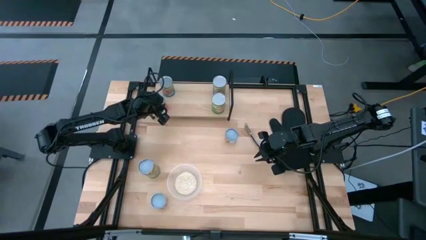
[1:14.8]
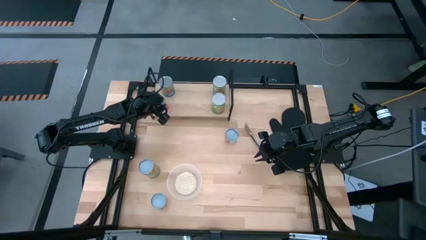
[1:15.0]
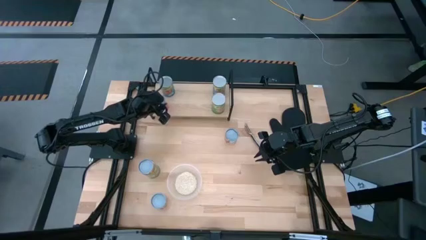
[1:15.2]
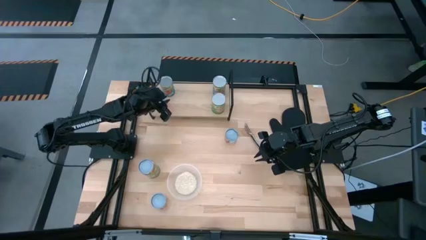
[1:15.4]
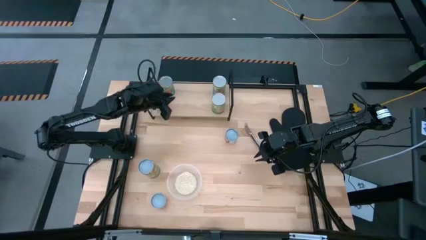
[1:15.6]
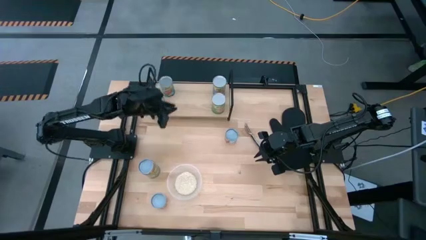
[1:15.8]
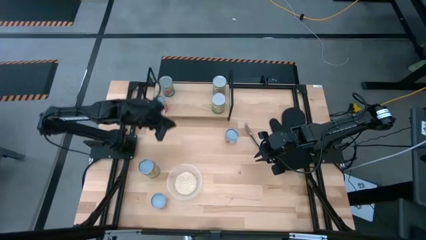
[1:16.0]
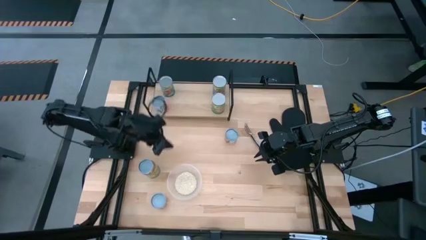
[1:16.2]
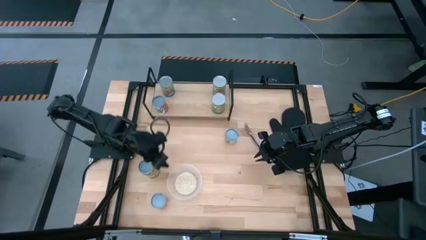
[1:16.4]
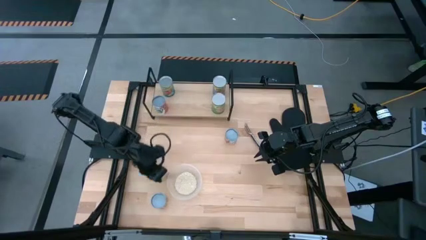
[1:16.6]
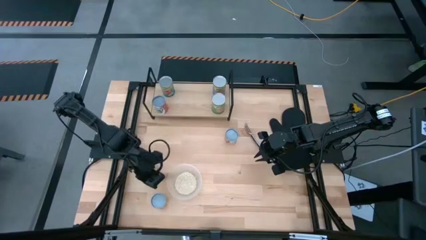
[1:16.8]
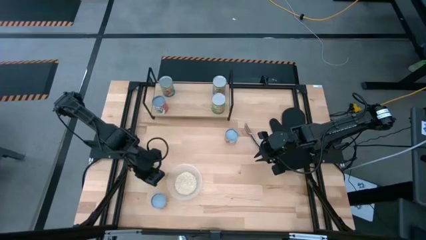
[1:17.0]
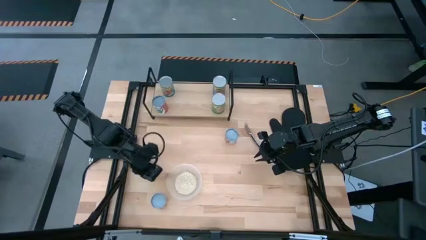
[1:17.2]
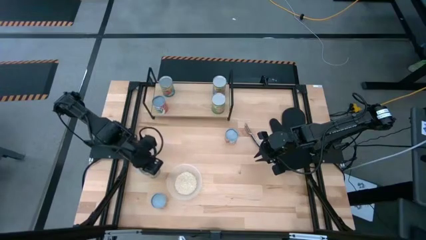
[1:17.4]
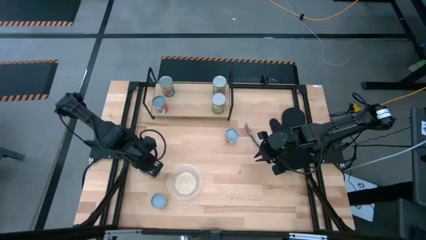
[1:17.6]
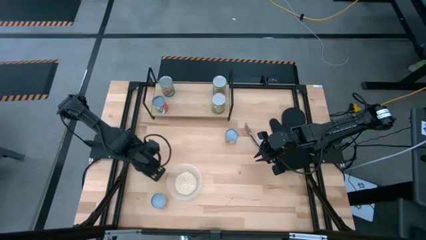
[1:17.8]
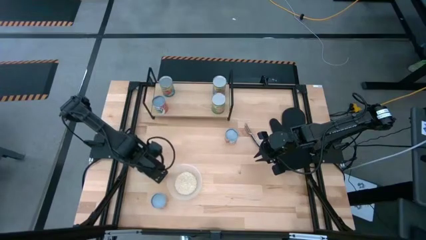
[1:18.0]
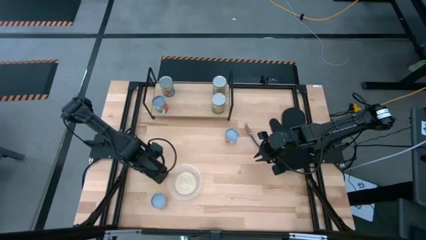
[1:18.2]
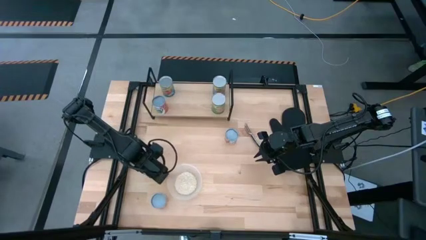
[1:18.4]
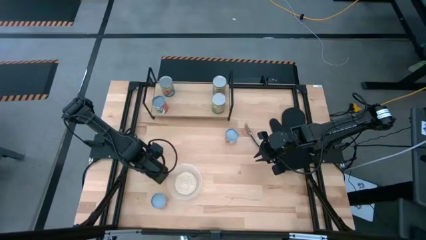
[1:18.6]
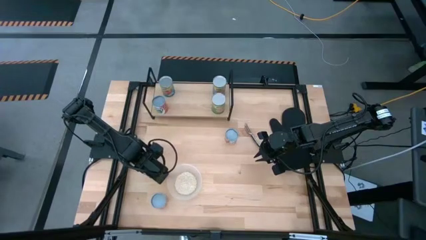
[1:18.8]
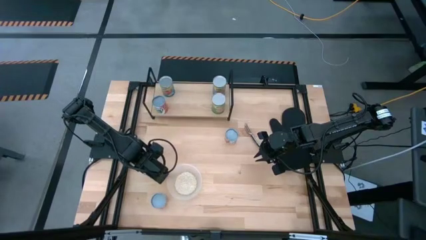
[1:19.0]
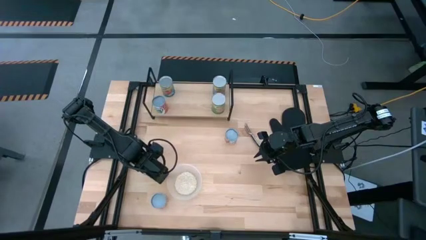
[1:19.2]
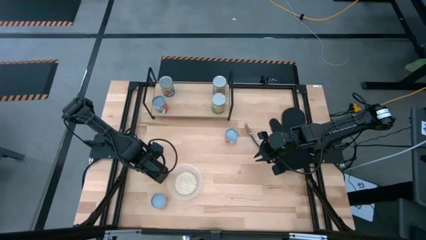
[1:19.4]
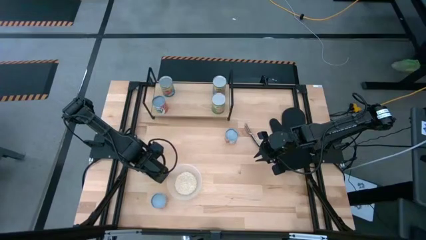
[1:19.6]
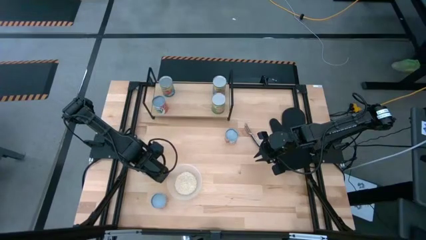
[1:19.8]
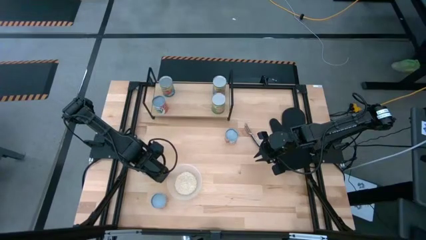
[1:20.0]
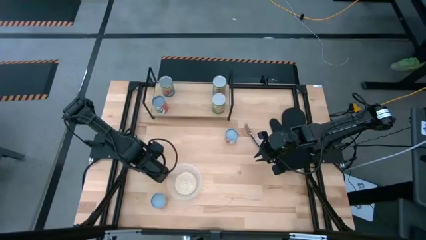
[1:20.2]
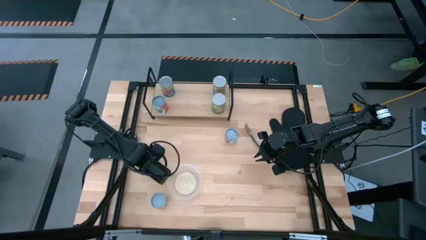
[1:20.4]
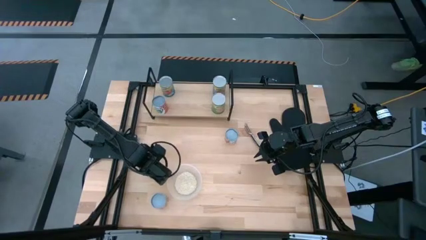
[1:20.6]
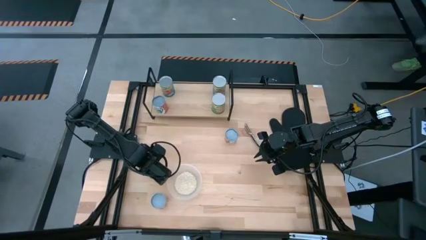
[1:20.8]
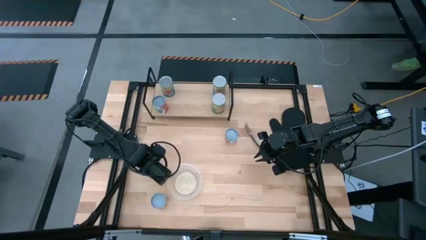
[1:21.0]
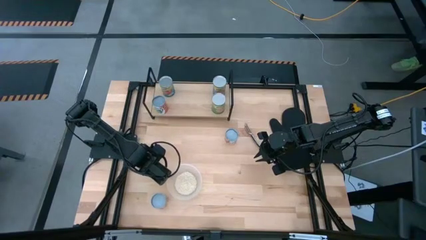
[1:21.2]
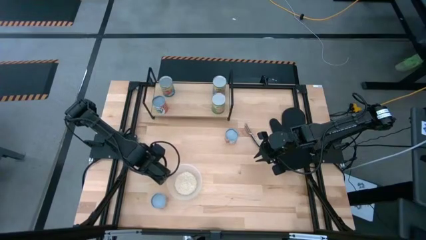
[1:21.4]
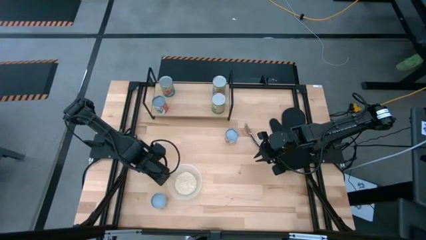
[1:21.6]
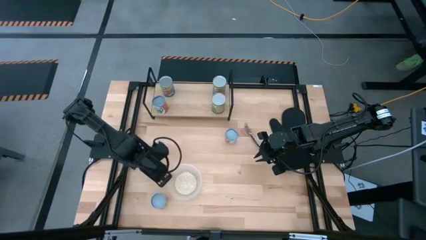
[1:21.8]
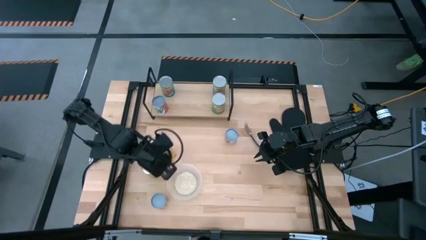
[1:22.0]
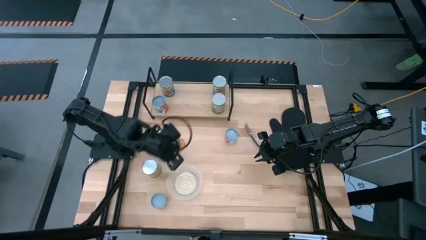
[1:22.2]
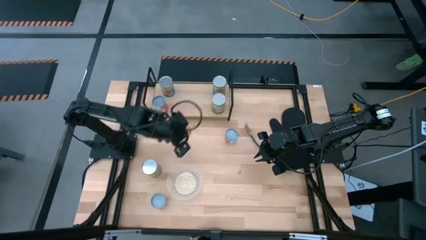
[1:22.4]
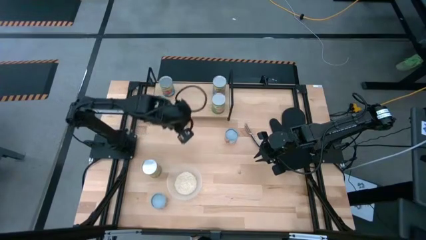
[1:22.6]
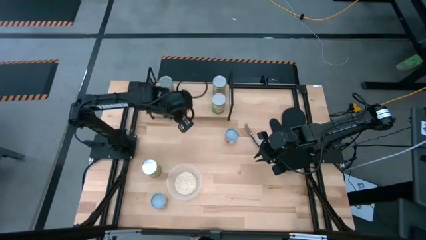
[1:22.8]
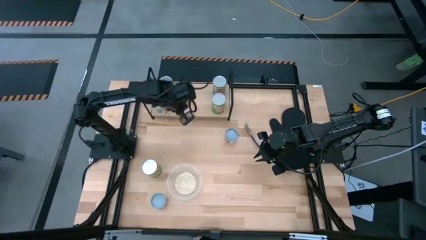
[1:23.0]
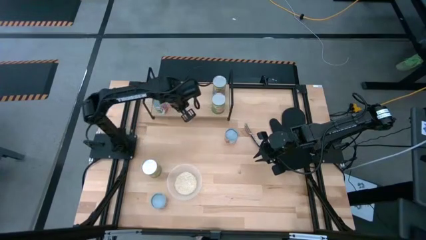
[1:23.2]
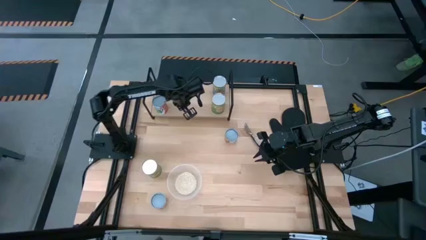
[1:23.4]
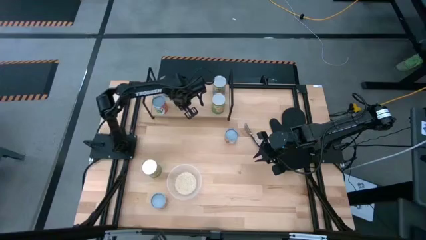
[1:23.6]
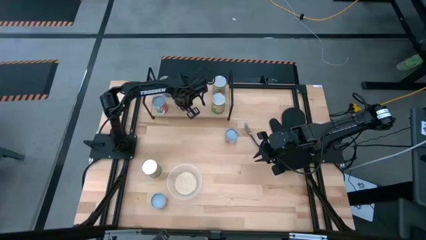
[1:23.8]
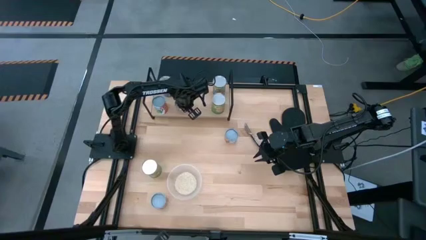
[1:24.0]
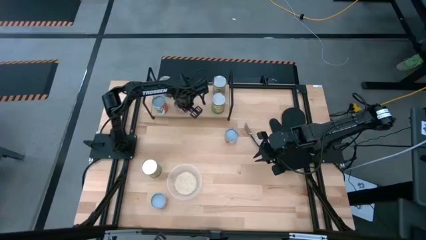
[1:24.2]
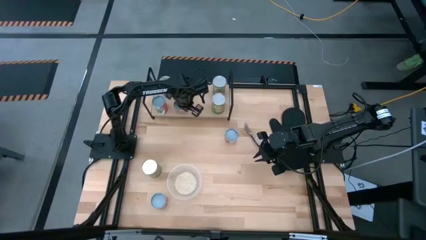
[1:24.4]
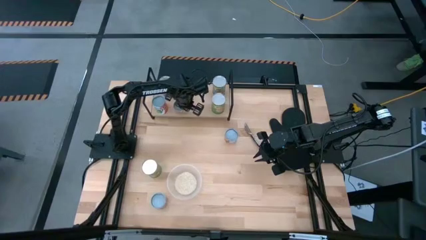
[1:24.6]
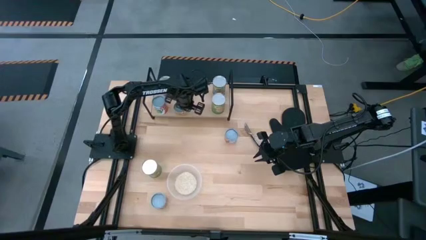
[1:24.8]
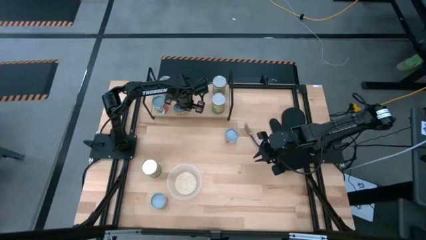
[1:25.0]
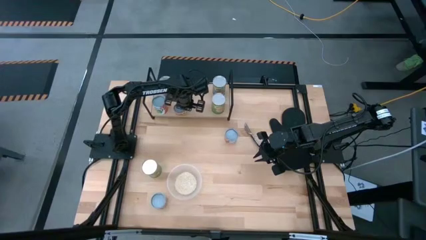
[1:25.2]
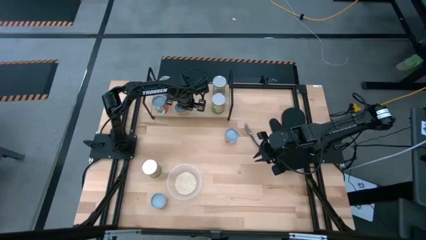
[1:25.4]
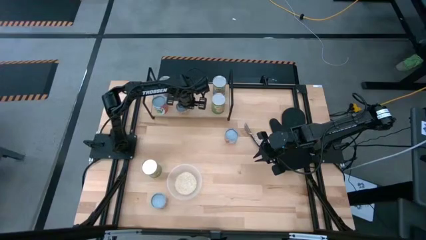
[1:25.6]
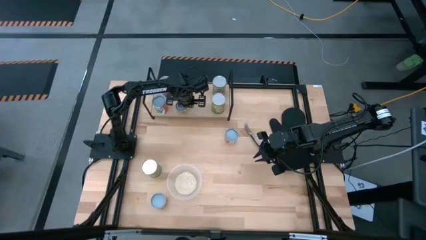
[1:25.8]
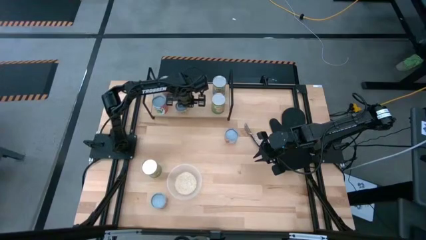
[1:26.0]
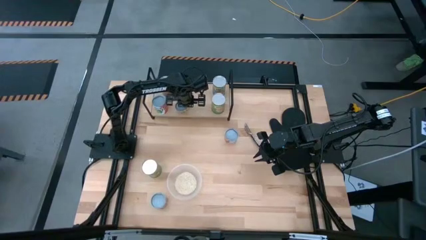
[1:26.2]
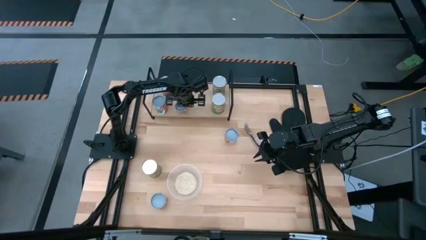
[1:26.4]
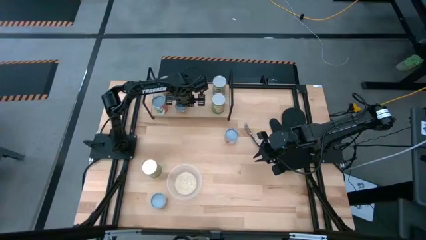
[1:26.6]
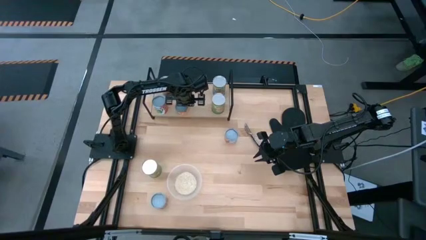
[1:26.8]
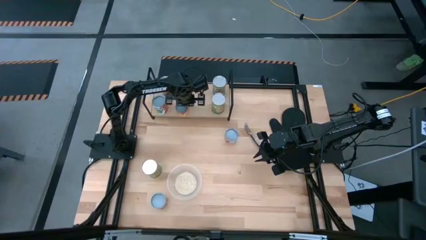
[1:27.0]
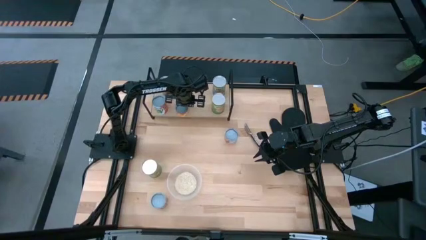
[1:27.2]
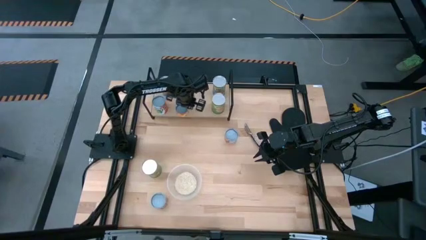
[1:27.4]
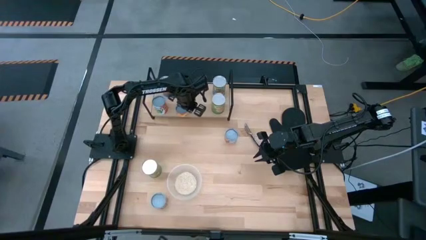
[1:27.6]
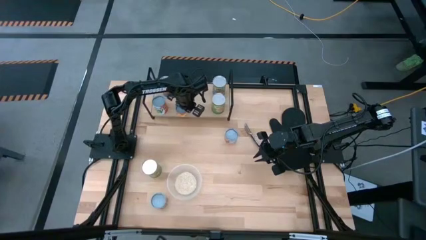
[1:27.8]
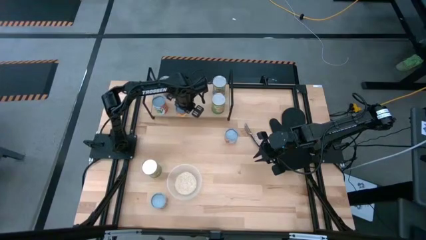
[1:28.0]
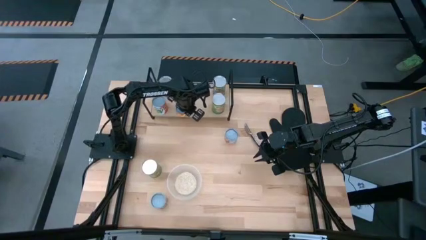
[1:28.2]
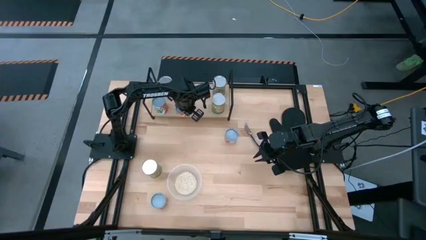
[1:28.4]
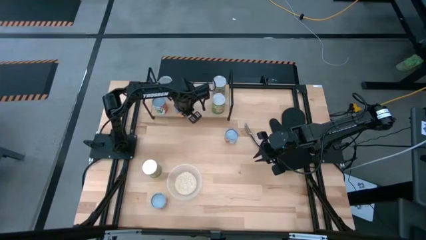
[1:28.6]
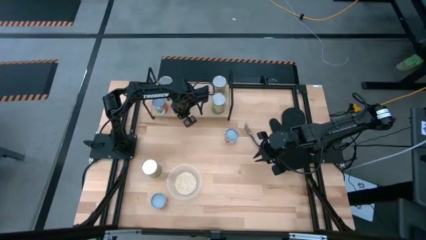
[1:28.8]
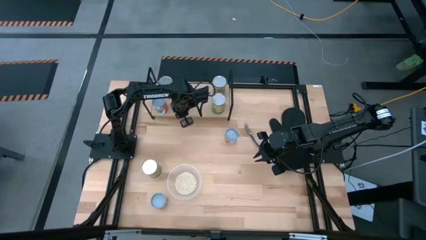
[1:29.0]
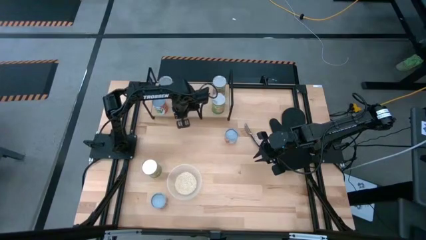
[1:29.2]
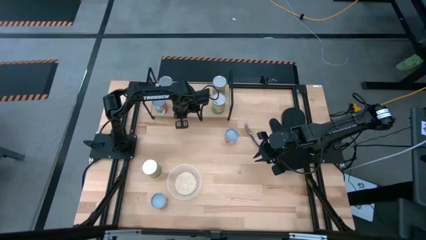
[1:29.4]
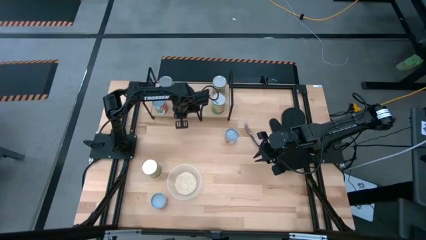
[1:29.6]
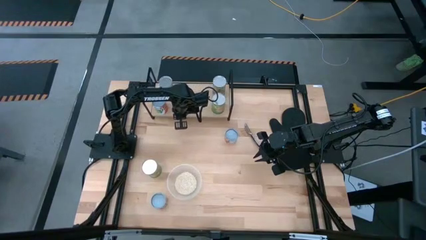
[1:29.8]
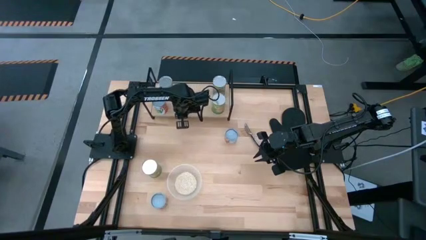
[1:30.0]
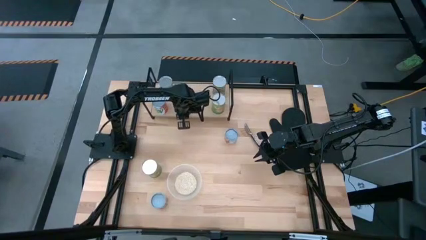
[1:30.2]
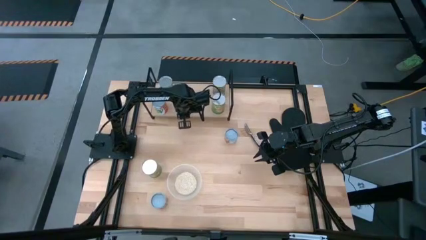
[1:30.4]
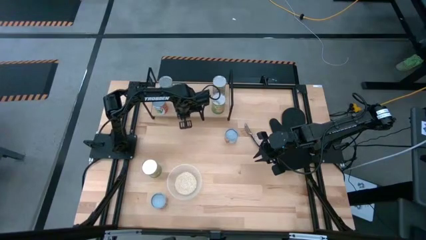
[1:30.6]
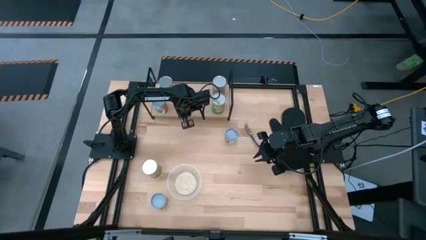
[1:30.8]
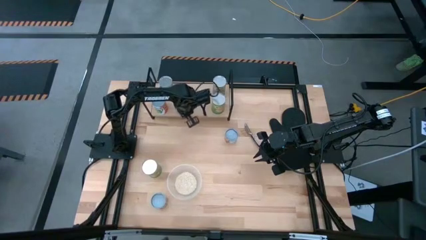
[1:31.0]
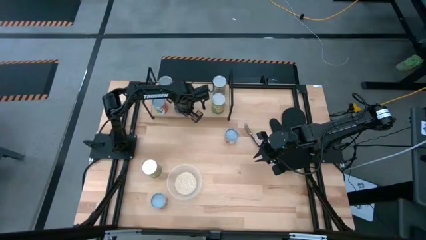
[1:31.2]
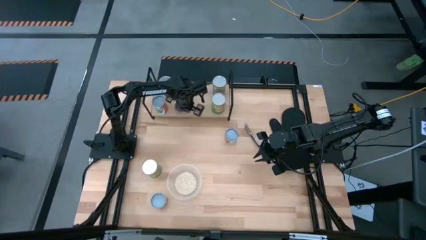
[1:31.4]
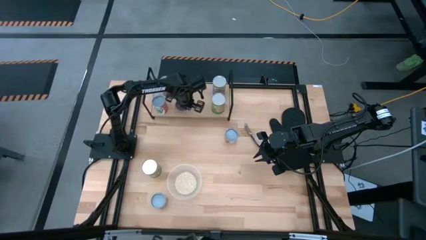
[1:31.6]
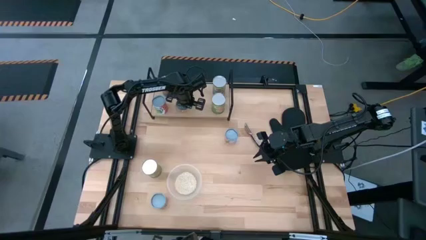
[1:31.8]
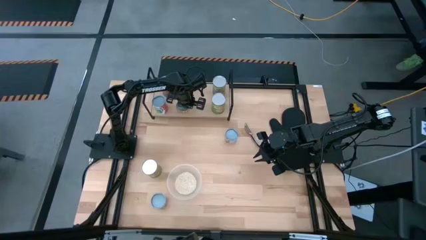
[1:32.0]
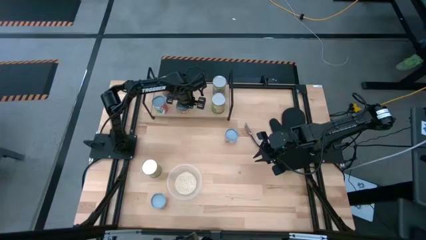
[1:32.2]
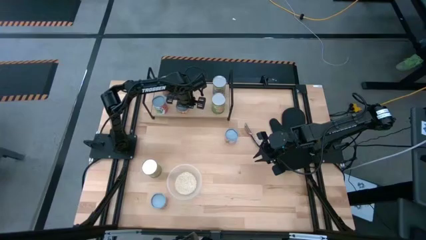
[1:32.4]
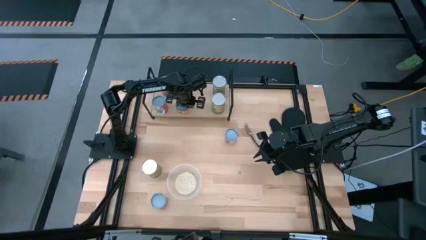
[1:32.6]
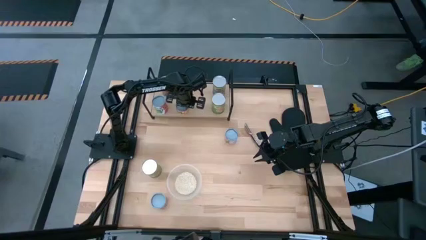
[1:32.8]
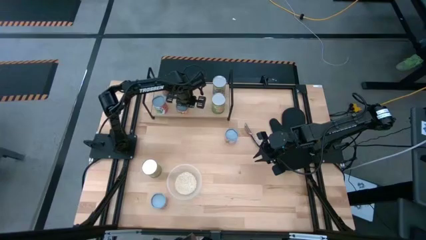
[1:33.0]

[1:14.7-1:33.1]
Task: Pick and place cans onto a shelf
Put the canned pineapple rings on the shelf
